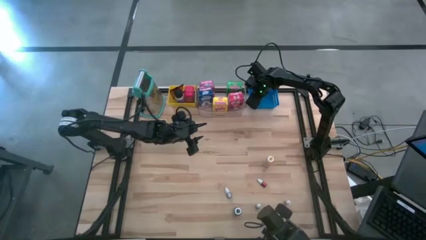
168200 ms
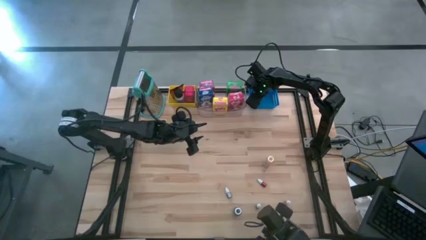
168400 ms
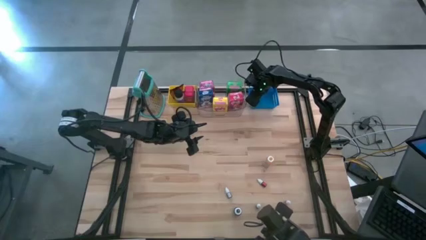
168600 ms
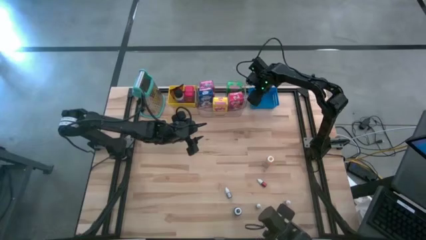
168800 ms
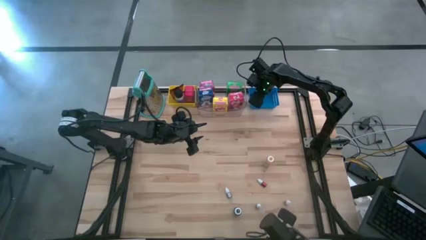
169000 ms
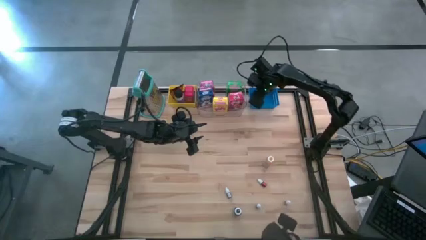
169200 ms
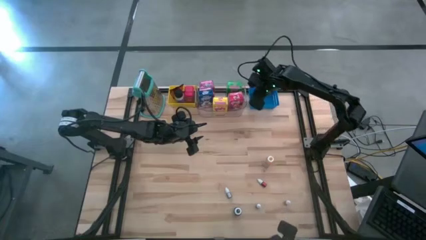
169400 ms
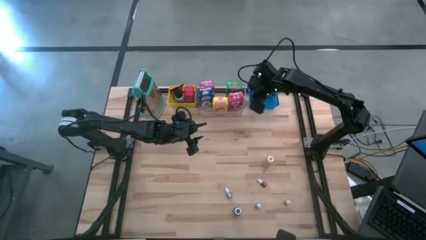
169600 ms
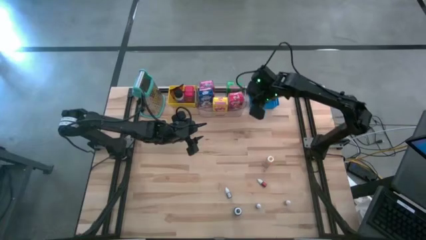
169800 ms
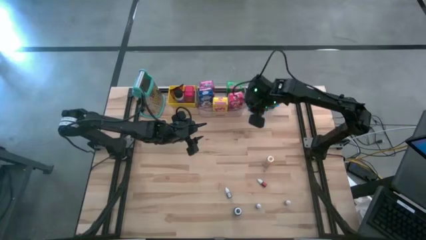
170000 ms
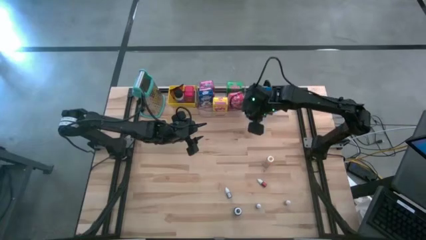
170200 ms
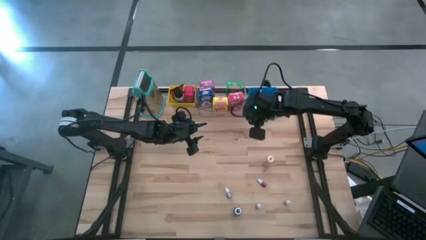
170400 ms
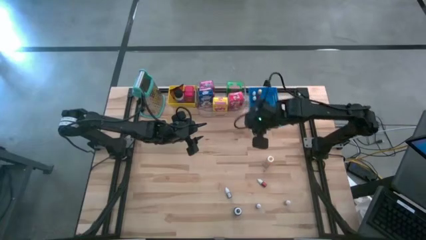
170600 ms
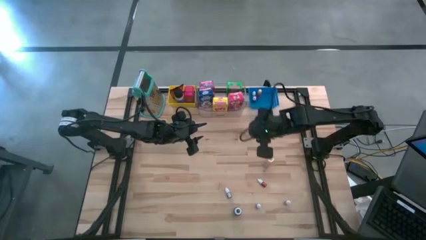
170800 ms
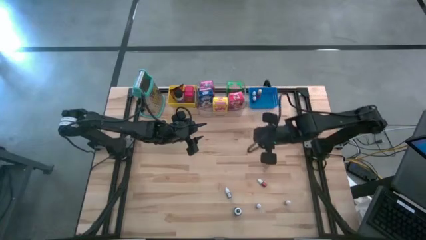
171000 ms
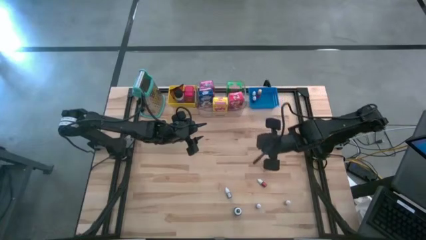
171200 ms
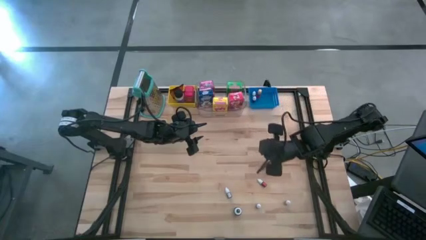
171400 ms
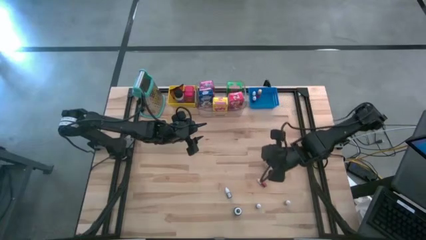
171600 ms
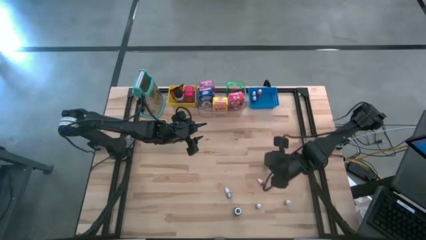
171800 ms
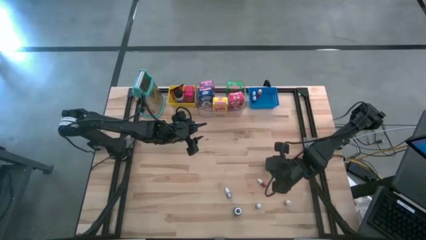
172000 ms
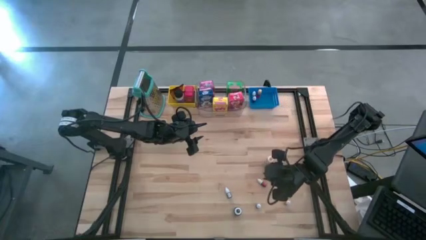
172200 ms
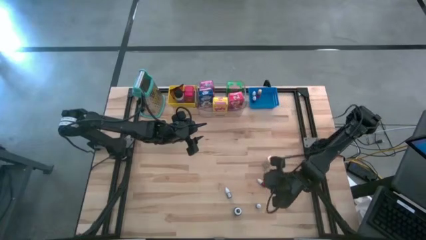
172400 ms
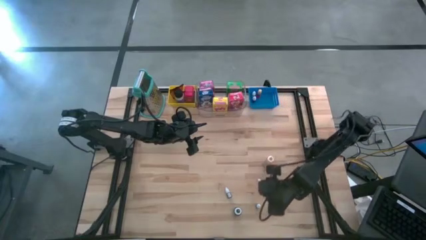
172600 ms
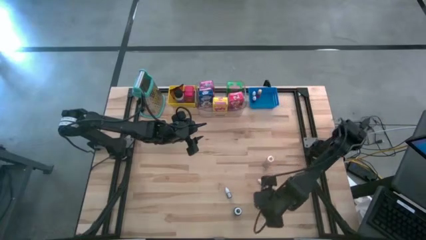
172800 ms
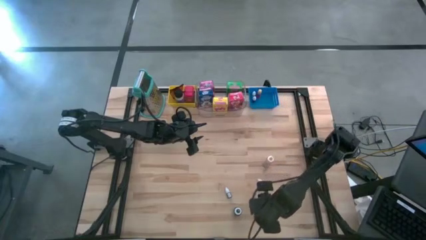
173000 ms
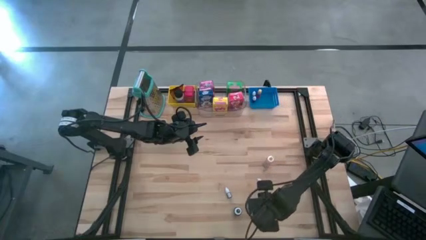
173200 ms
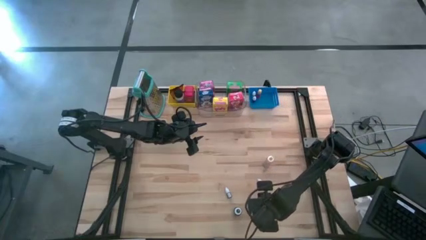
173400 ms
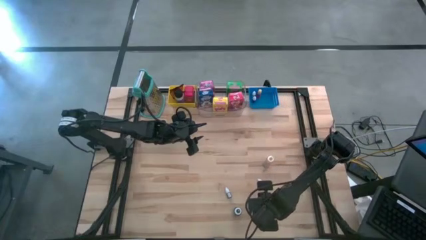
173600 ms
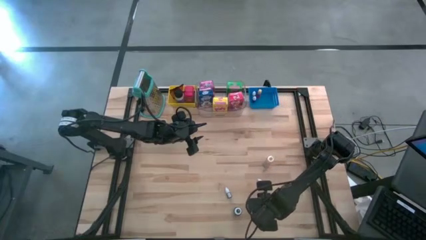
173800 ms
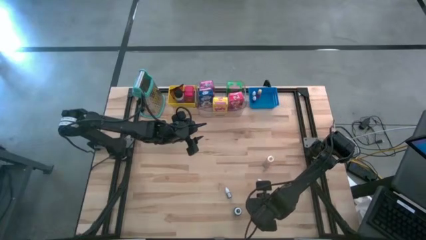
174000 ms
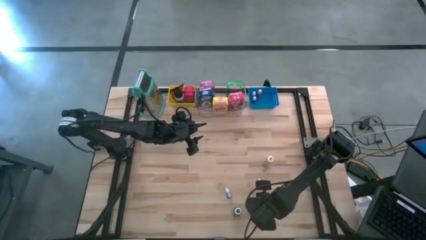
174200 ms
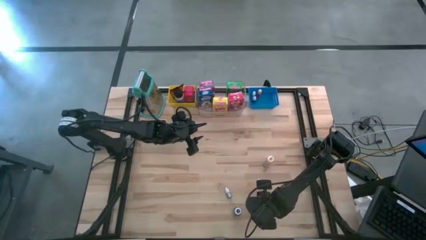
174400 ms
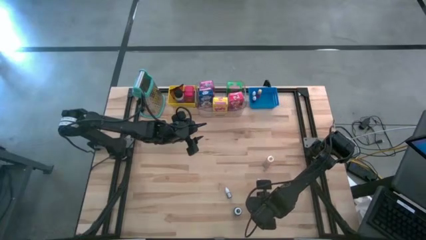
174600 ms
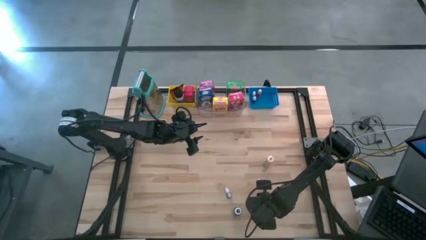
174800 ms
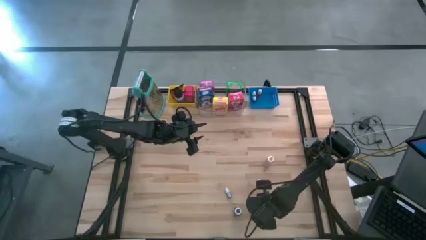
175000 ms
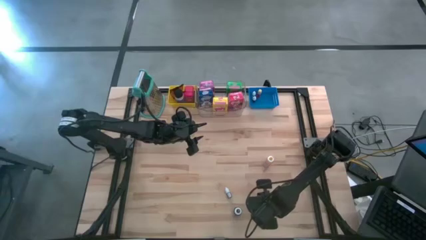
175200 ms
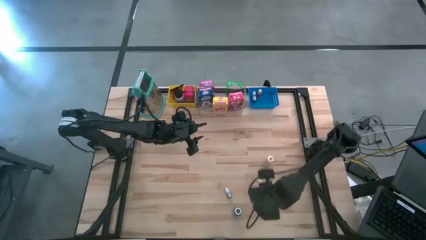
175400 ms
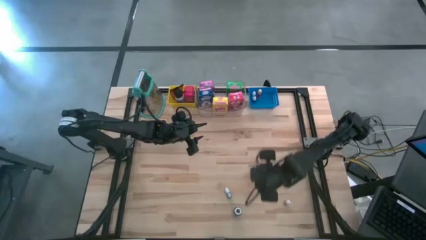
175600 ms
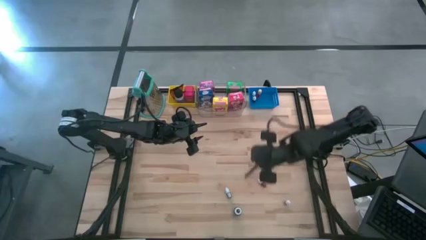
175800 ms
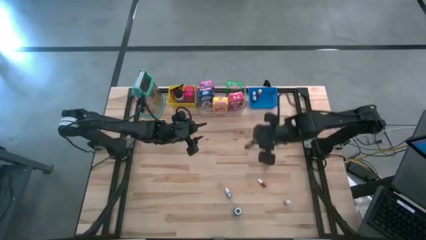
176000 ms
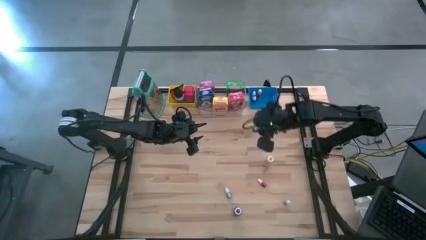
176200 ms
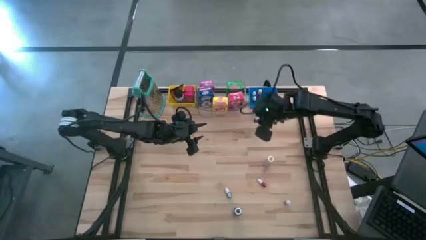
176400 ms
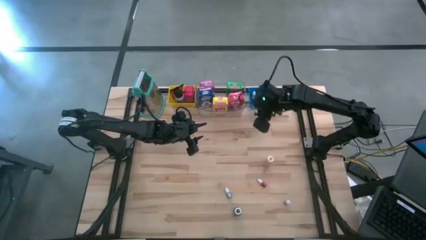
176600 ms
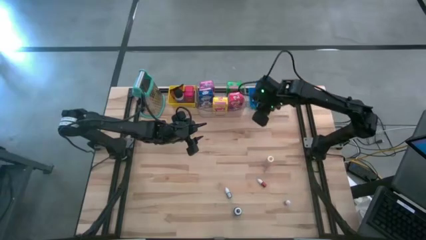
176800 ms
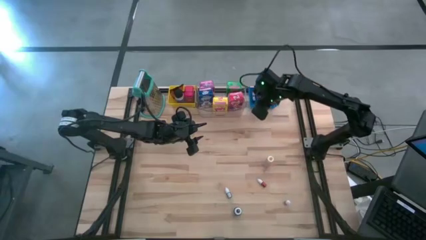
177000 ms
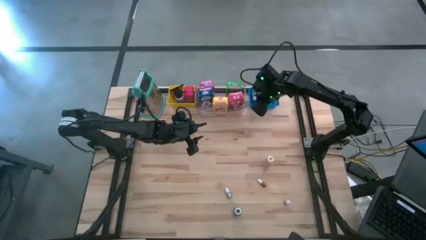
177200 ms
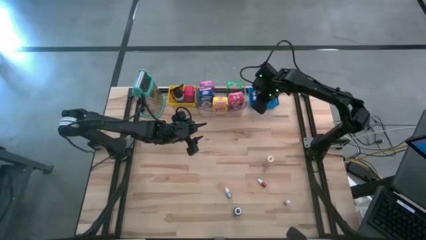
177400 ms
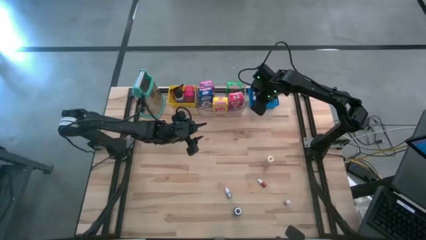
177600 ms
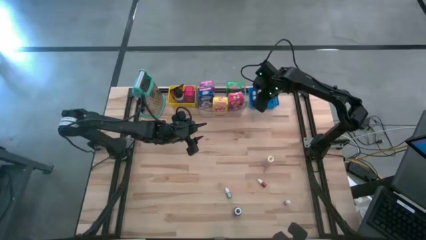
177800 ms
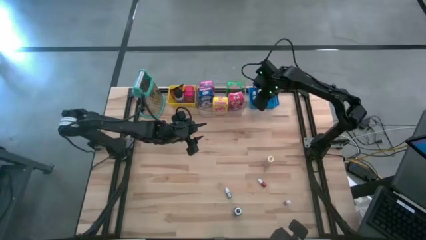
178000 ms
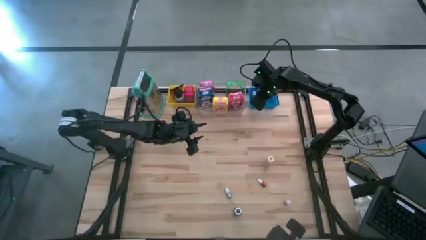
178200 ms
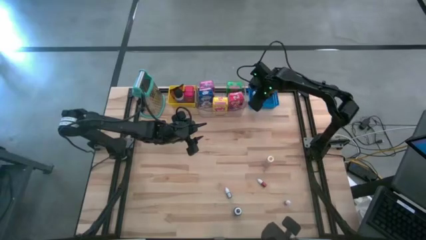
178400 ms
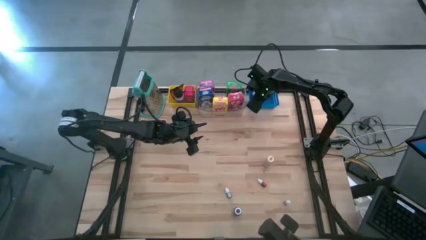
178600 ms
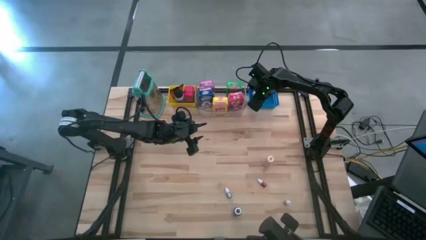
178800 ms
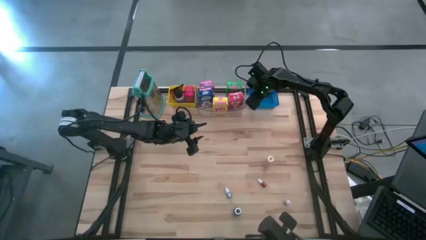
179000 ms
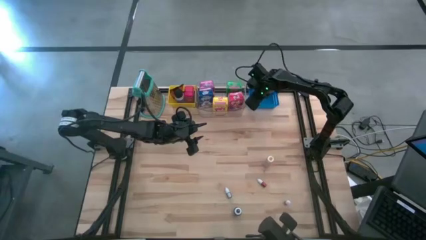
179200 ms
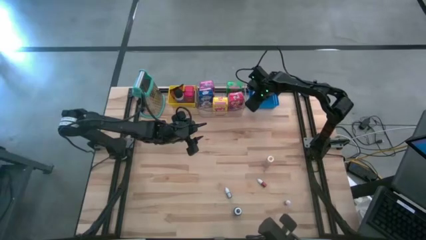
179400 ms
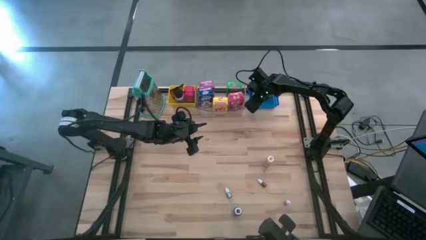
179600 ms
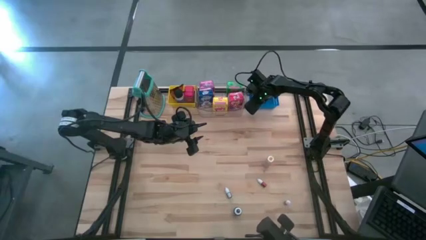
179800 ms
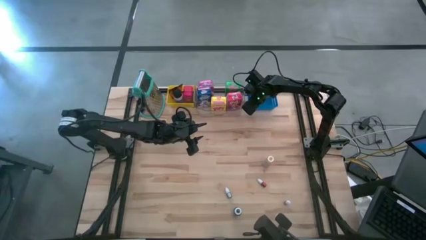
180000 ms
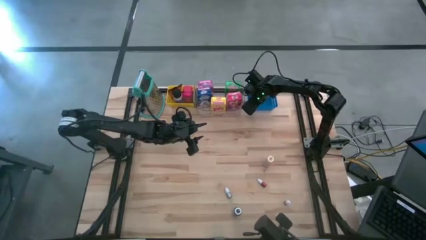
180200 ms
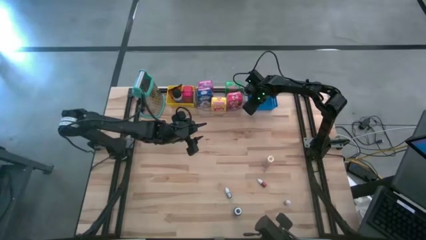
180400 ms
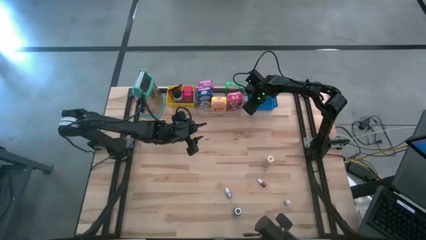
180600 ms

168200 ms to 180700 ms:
Task: Pick & Place Kitchen Items
Put the top blue bottle into the blue bin
